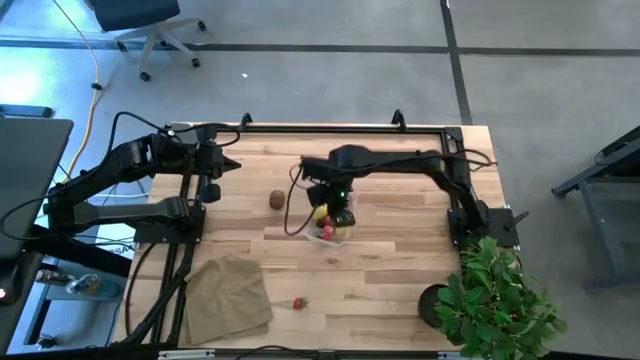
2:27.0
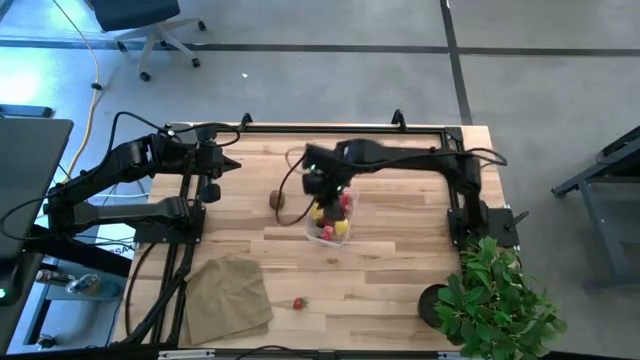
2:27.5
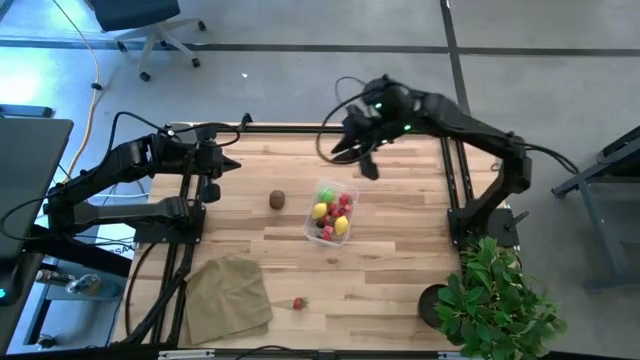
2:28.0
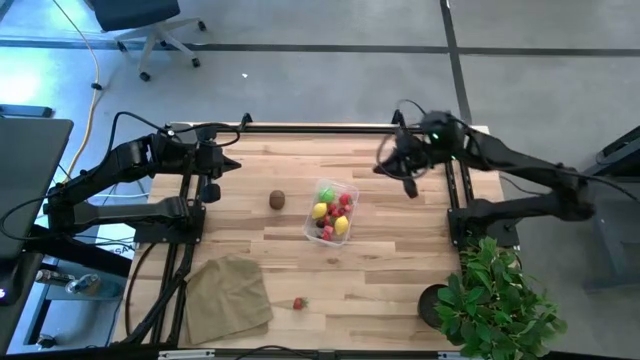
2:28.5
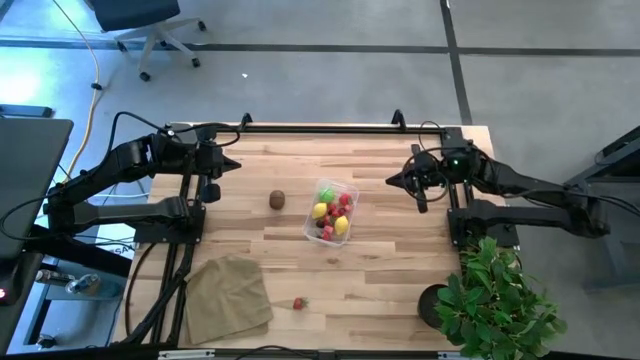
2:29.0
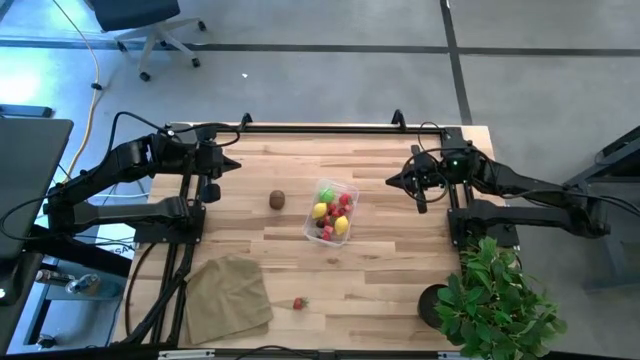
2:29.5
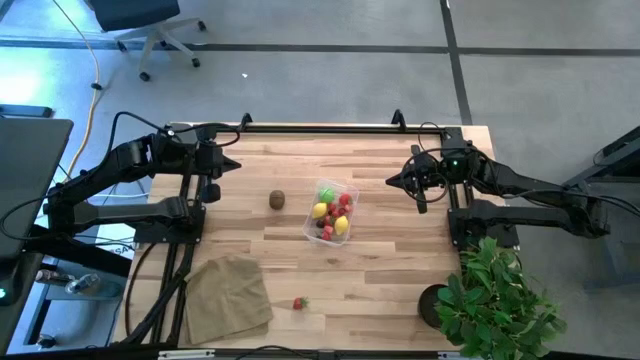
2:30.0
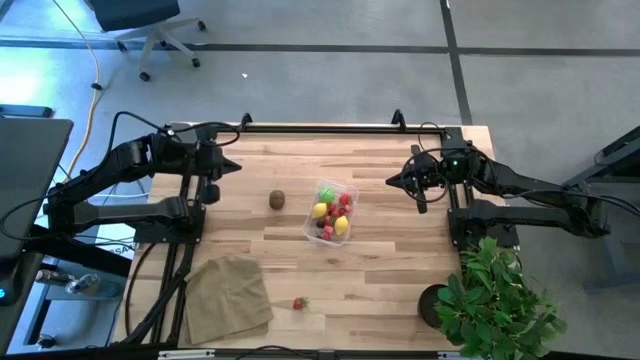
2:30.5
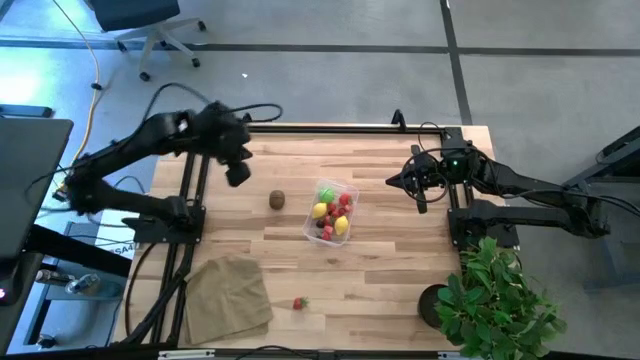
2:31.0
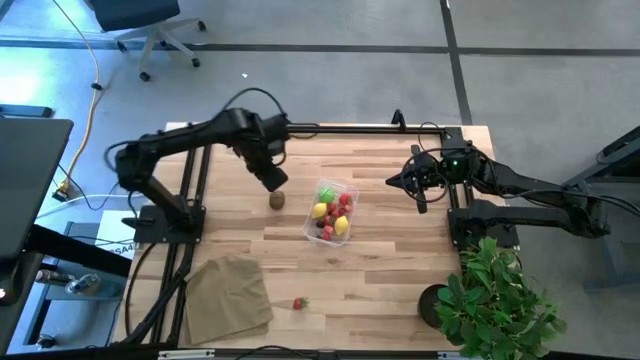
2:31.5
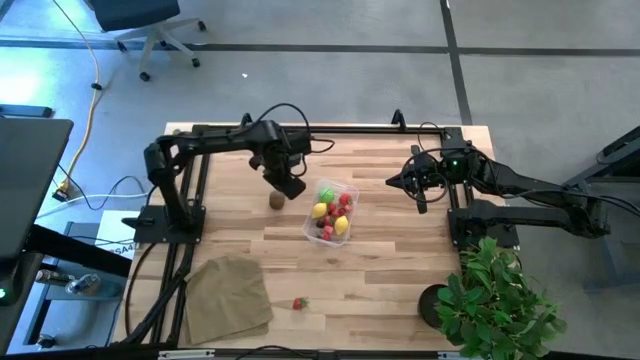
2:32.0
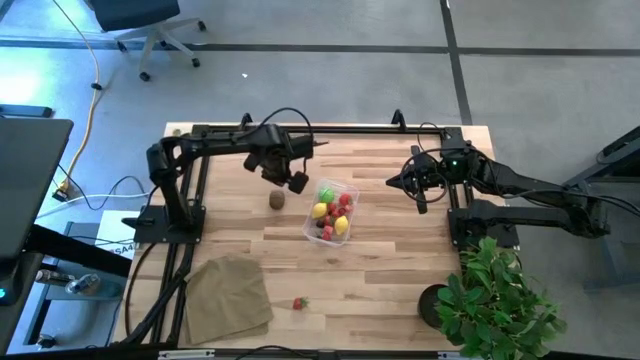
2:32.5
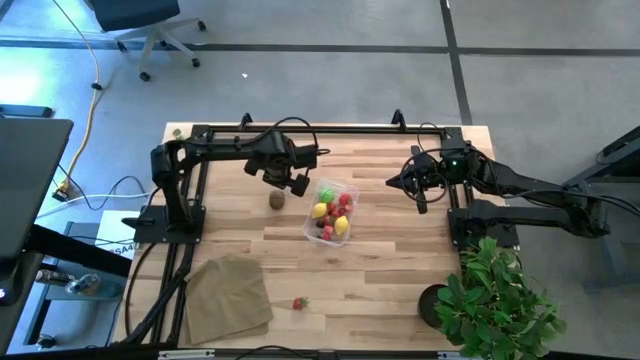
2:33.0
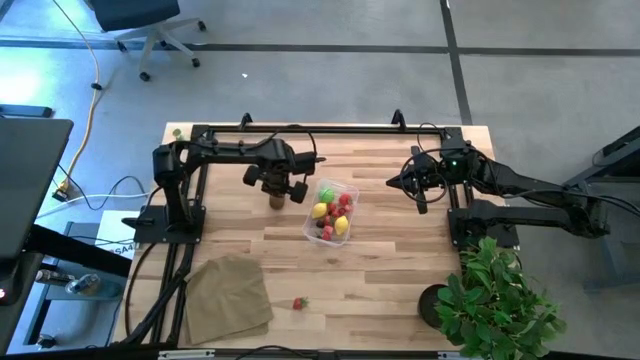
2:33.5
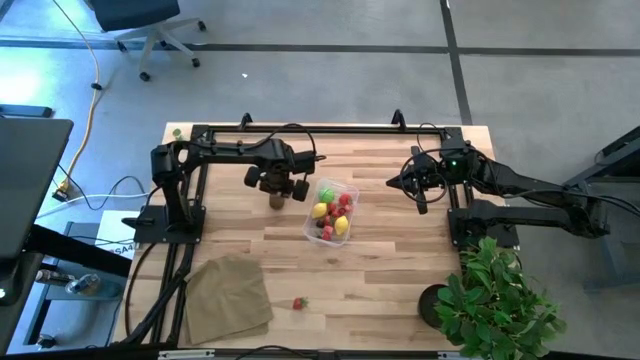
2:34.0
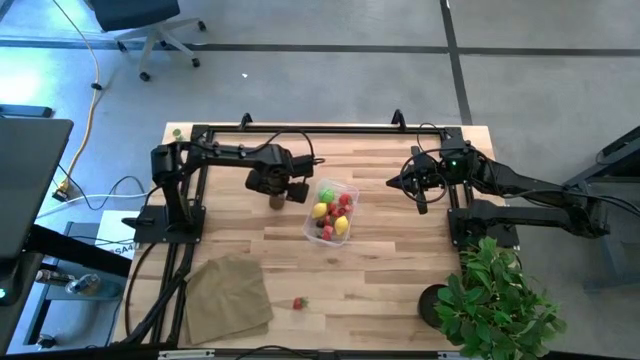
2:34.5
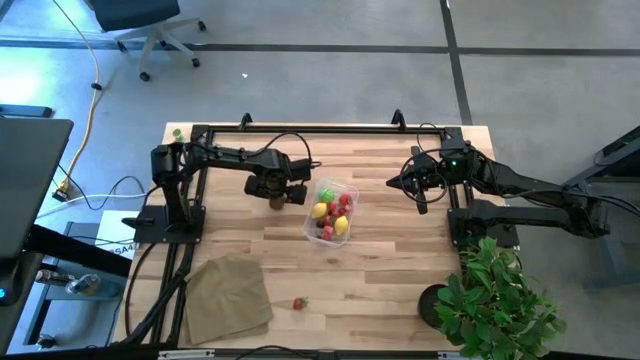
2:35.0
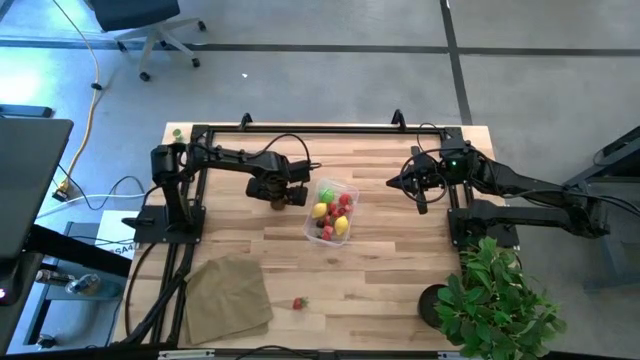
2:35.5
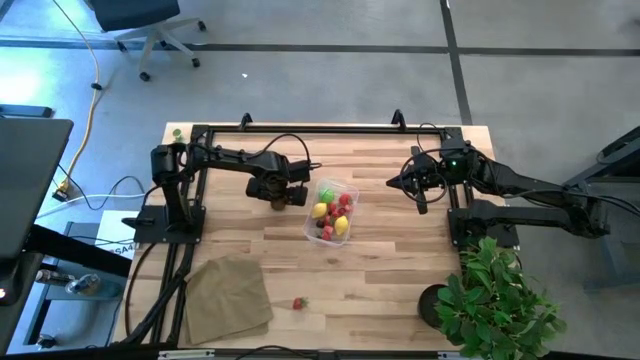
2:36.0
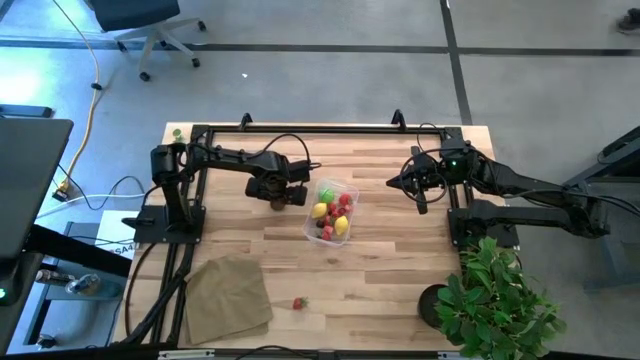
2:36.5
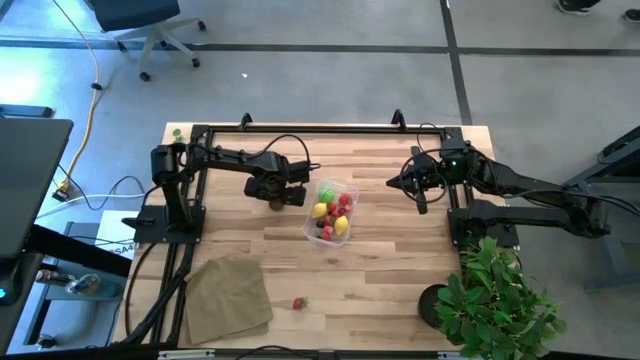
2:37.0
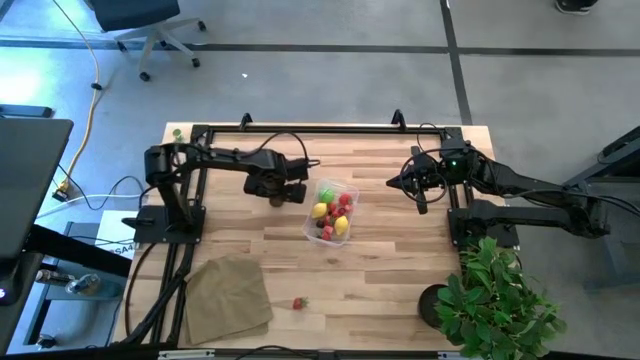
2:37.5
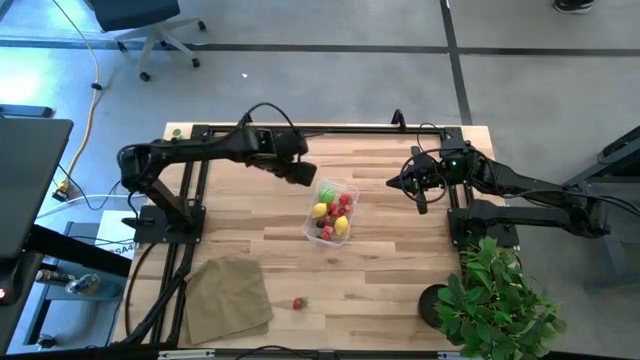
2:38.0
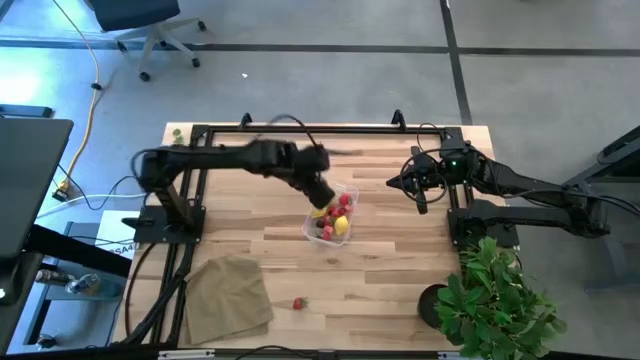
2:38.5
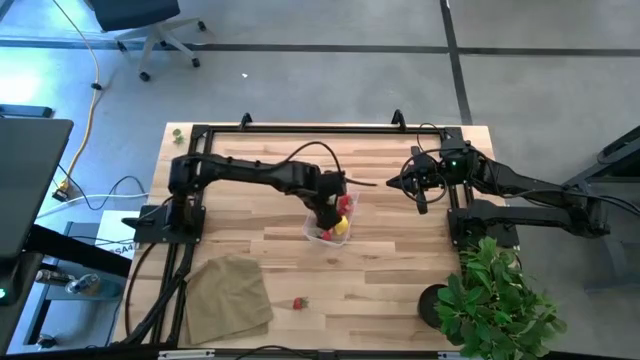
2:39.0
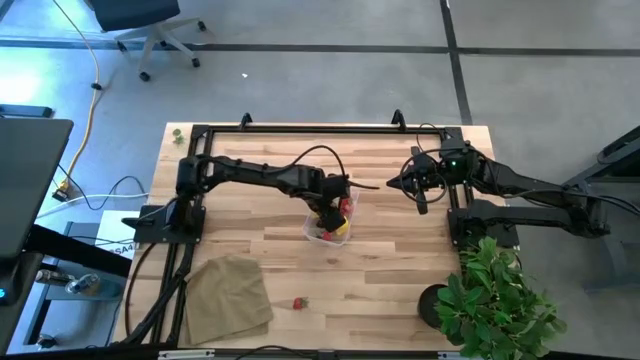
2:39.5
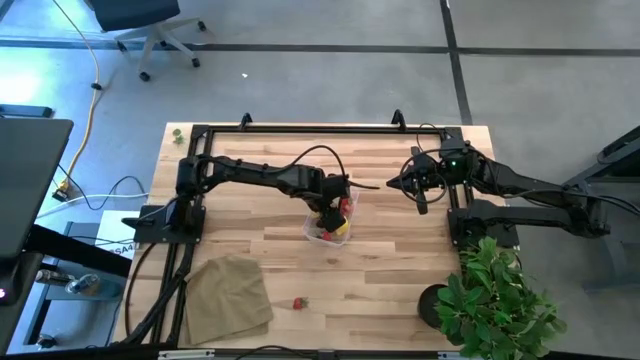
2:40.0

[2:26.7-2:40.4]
Task: Pick and placing Produce into tupperware
Put the kiwi into the transparent bin

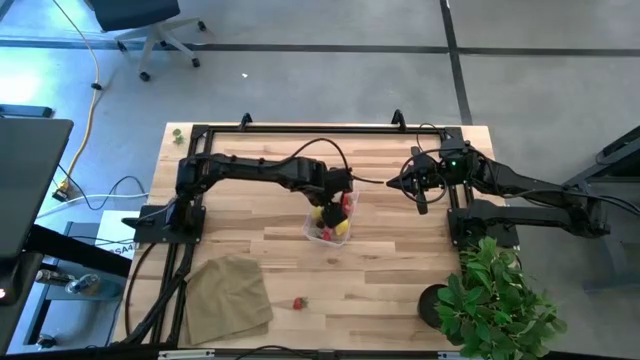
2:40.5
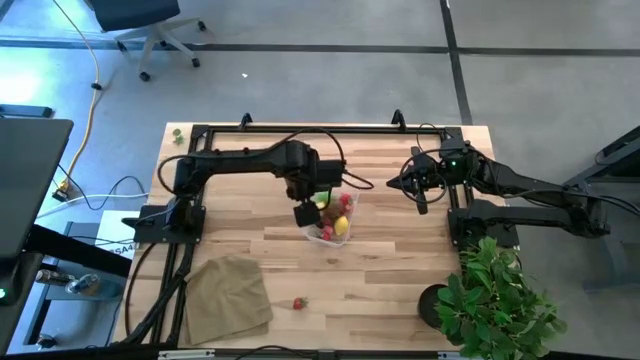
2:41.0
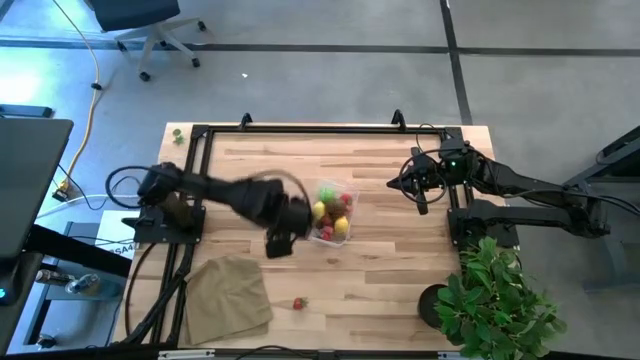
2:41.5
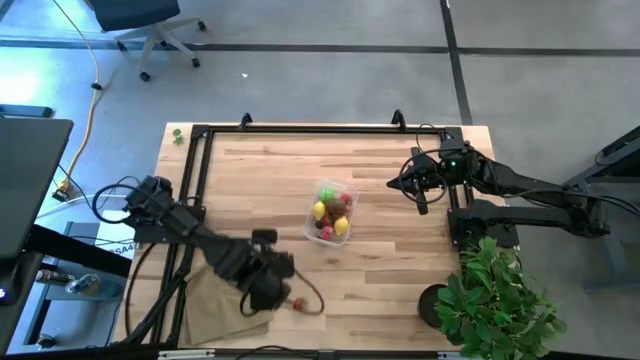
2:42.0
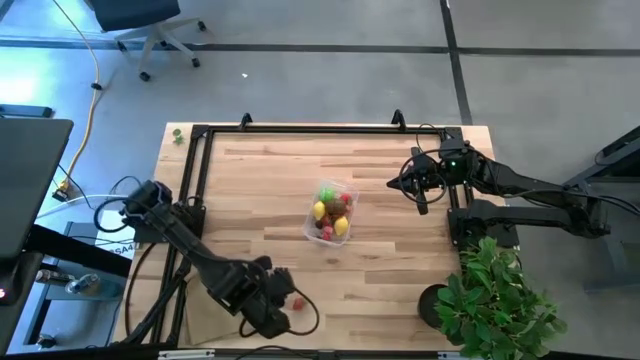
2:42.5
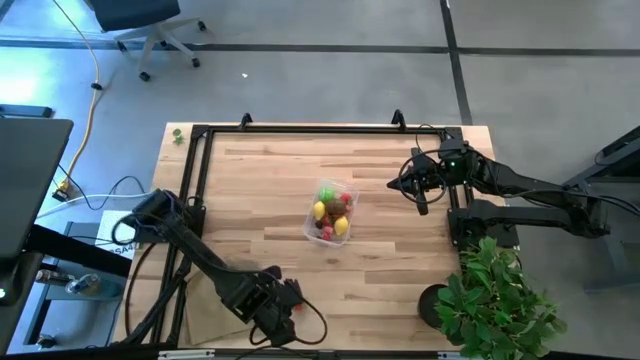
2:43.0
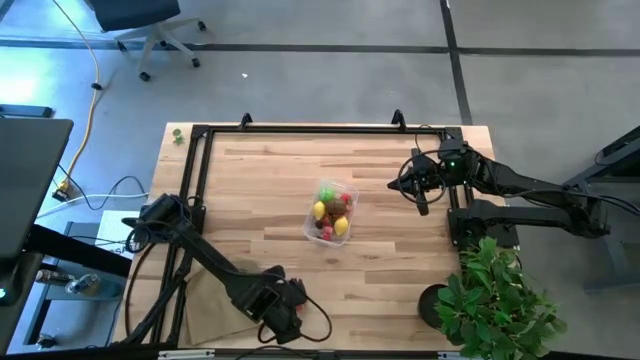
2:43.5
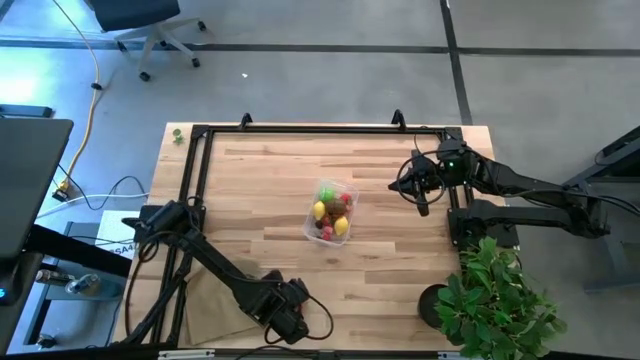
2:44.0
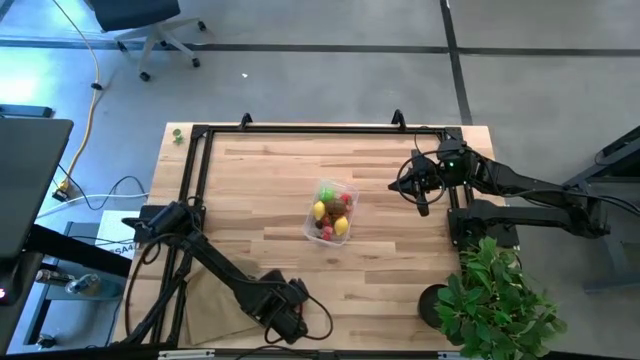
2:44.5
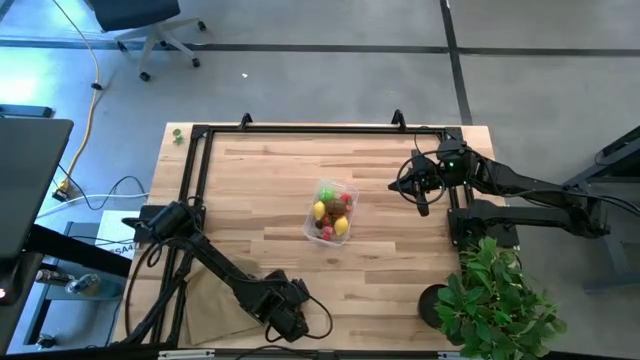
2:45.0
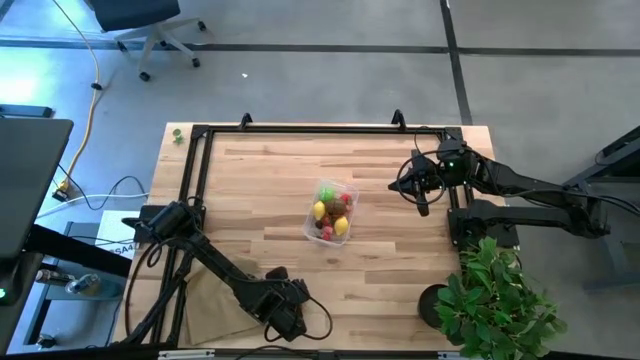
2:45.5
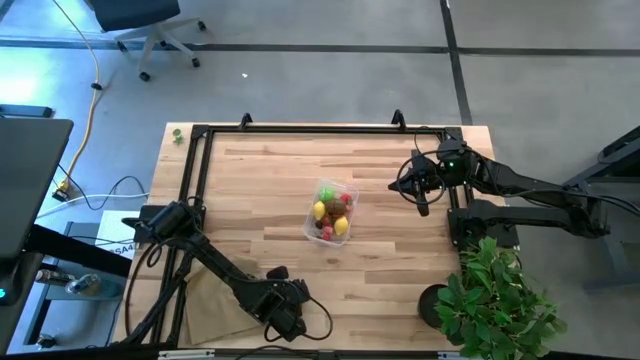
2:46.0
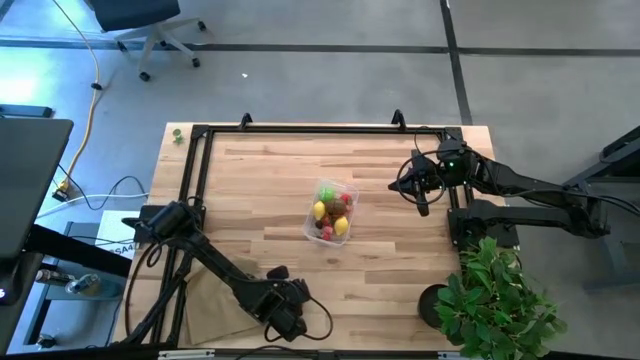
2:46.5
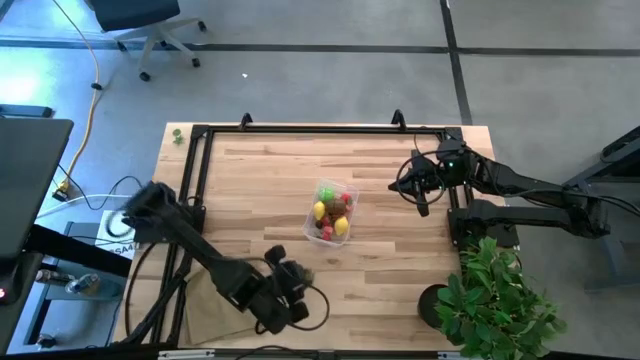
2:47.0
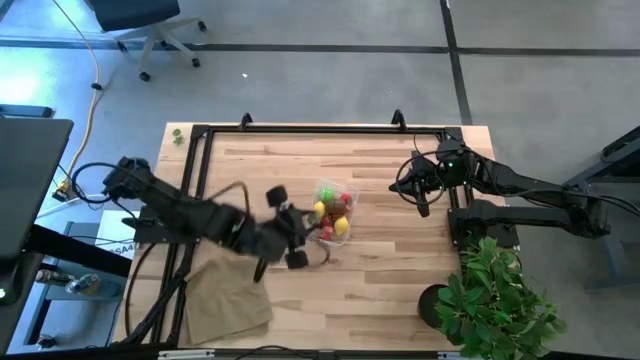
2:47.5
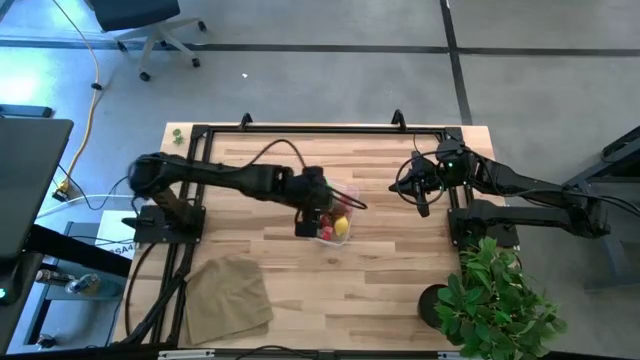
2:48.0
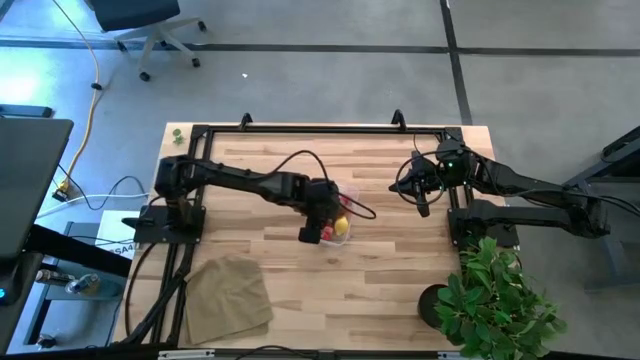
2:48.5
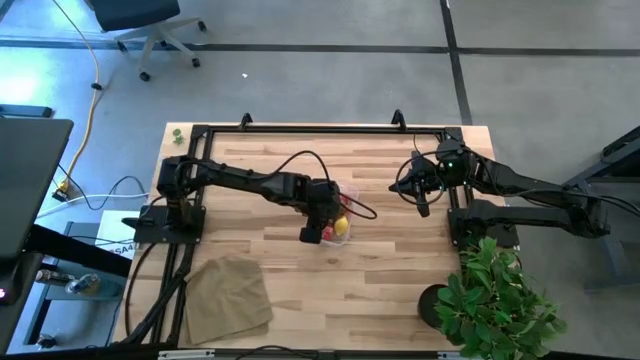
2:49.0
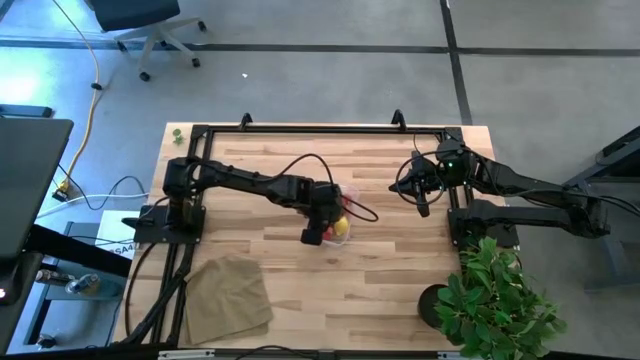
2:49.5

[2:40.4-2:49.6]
Put the strawberry into the transparent bin
